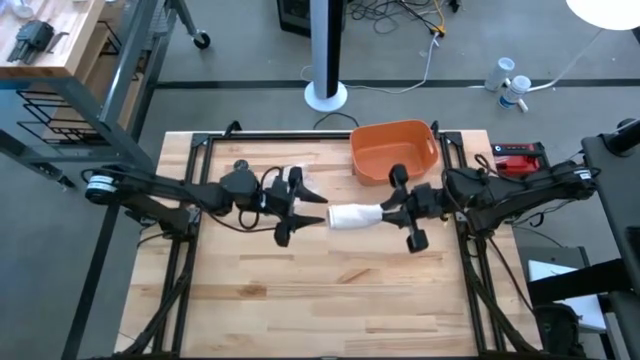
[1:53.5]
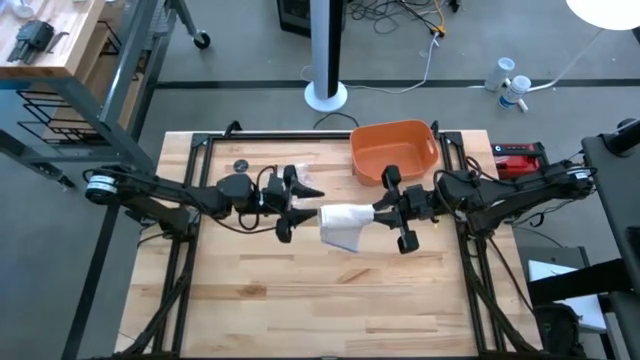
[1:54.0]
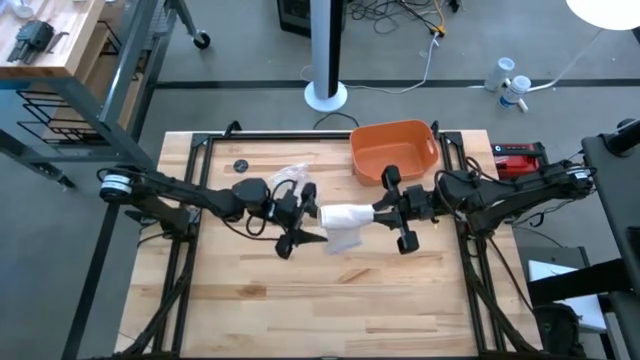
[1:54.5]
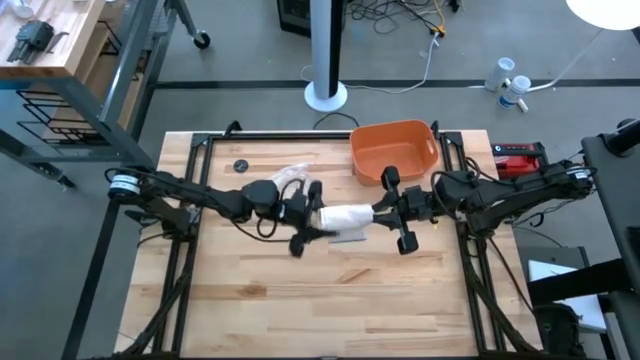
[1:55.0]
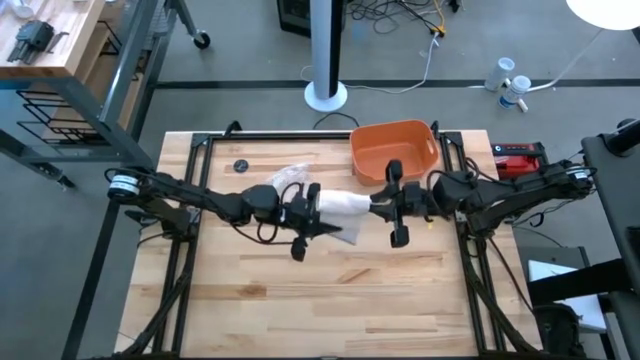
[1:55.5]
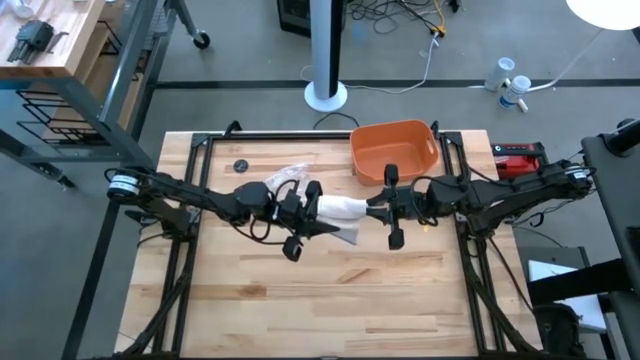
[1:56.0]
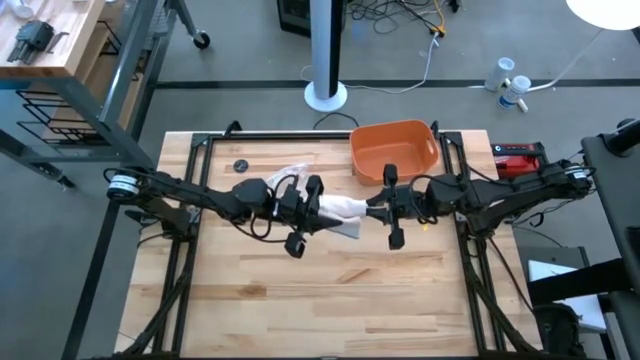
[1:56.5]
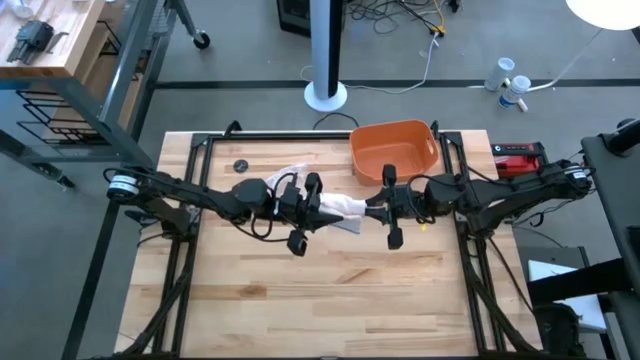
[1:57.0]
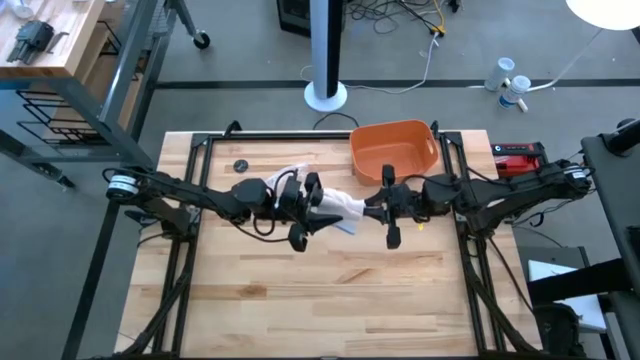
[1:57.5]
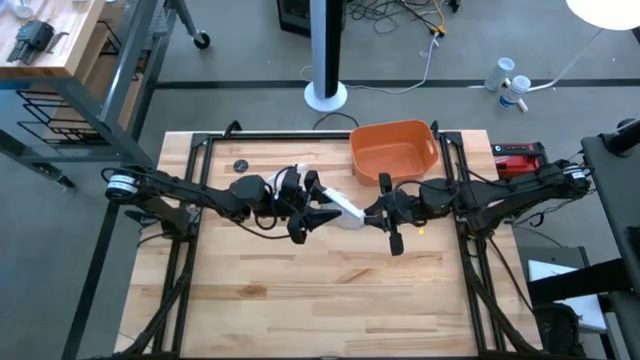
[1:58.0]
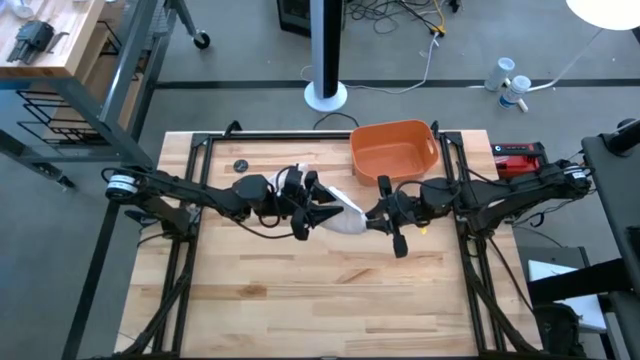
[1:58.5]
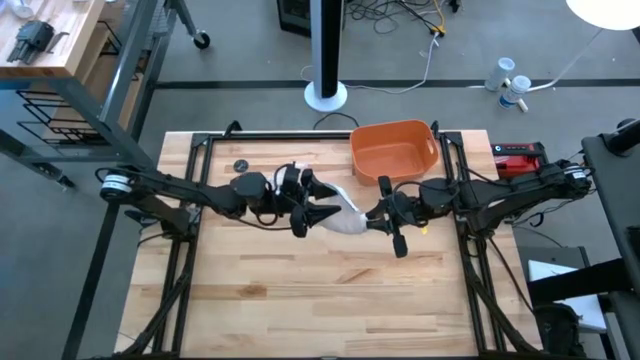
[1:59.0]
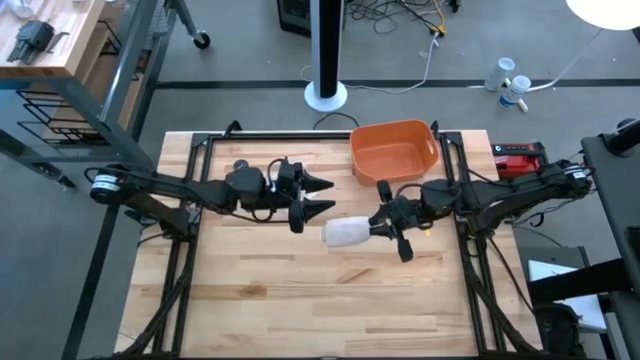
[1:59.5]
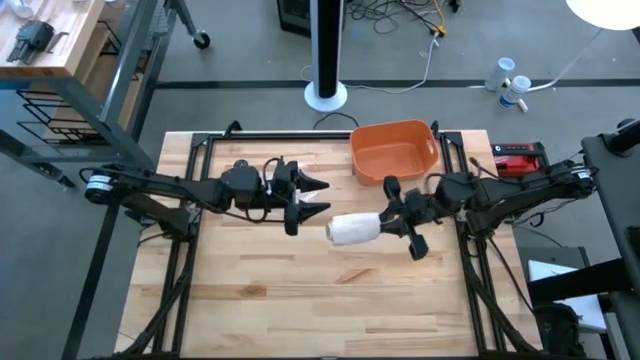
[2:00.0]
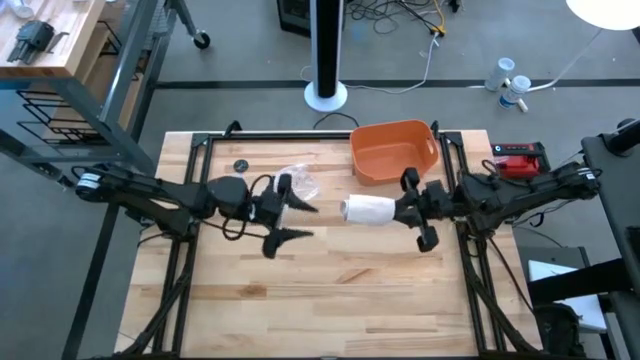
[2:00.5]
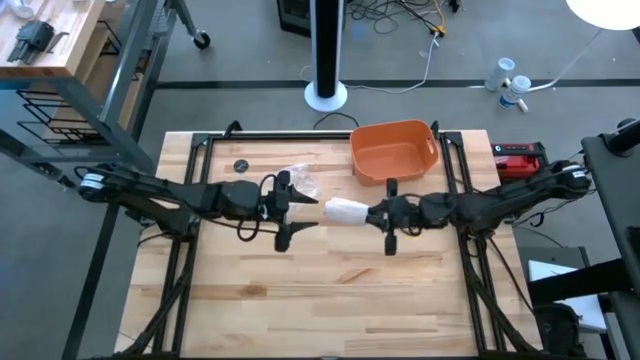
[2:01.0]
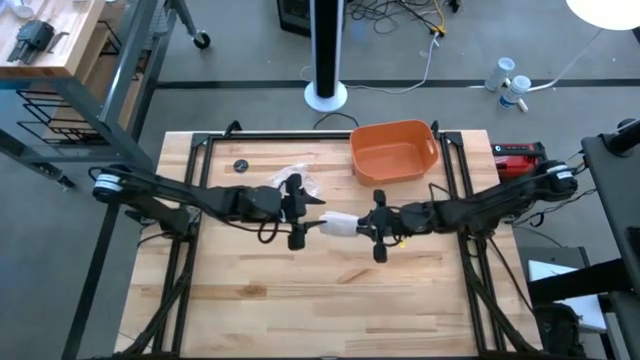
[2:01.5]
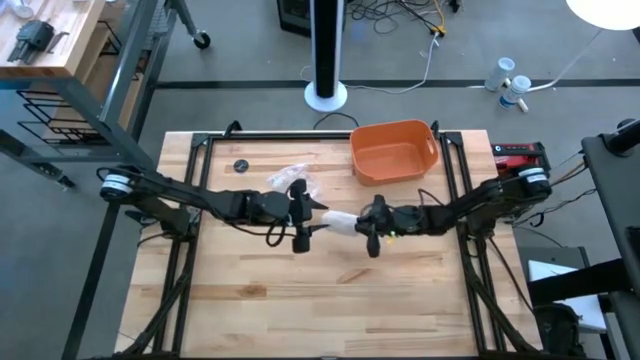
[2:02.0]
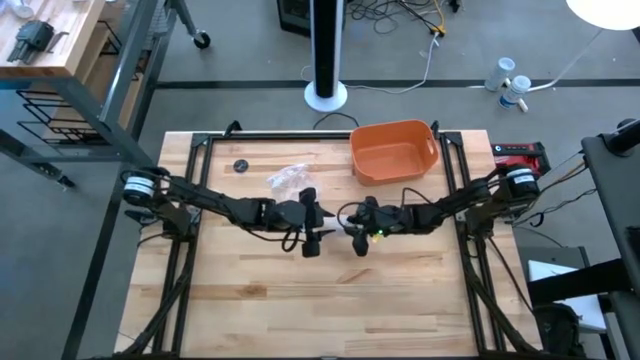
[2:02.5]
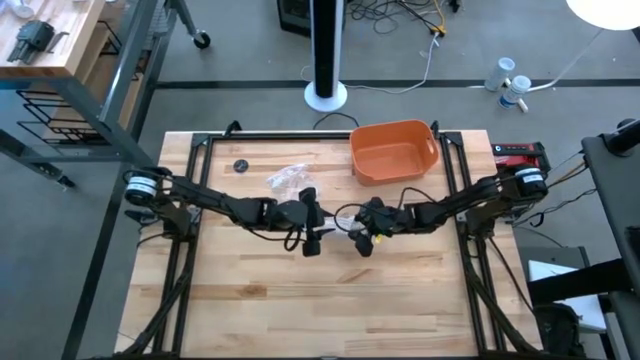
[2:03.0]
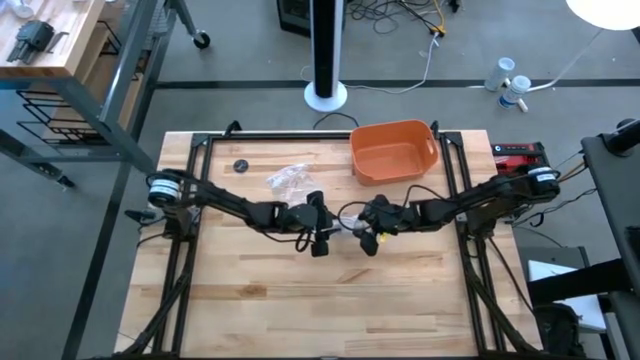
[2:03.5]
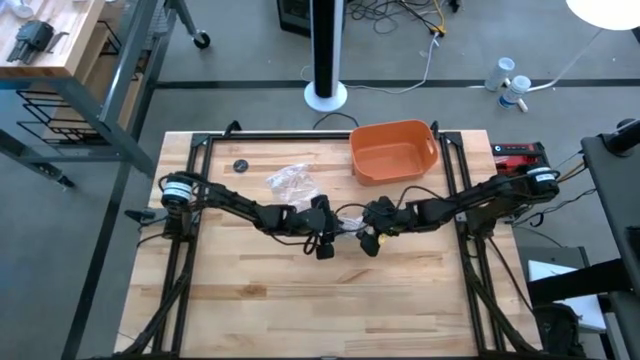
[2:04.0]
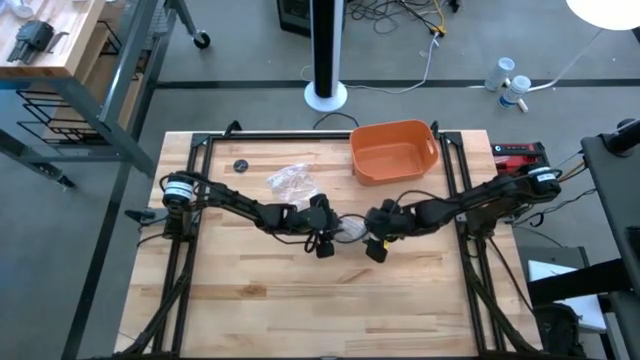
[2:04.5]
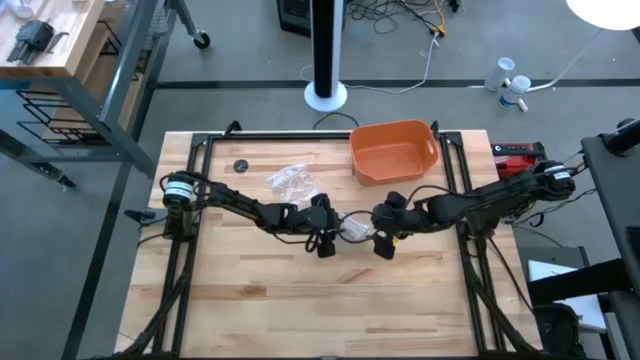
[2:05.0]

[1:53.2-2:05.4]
Task: Roll bandage
Roll the brown bandage

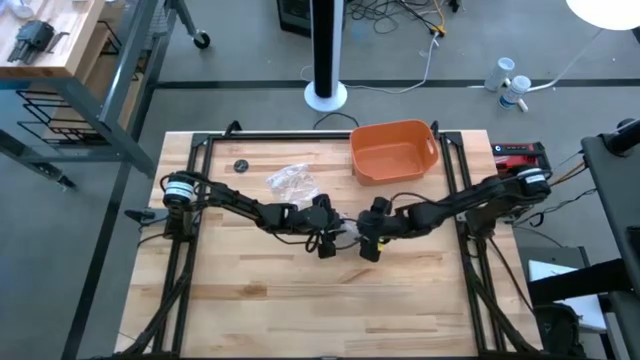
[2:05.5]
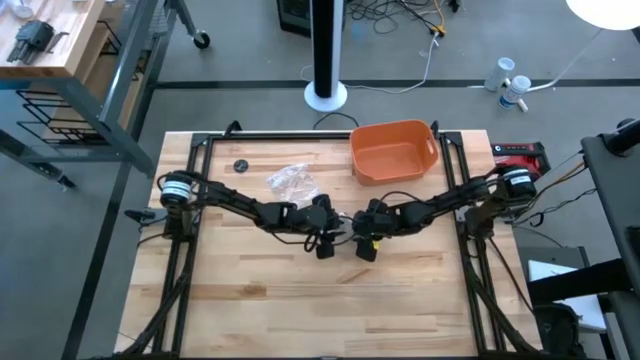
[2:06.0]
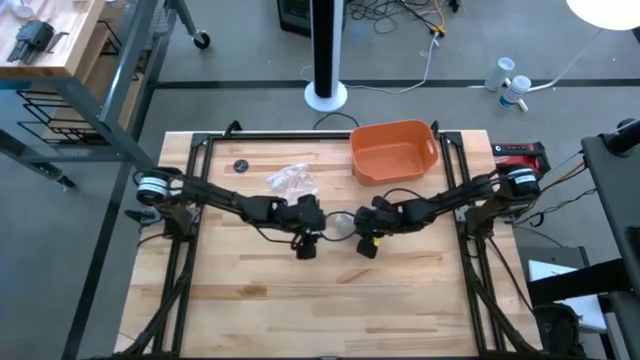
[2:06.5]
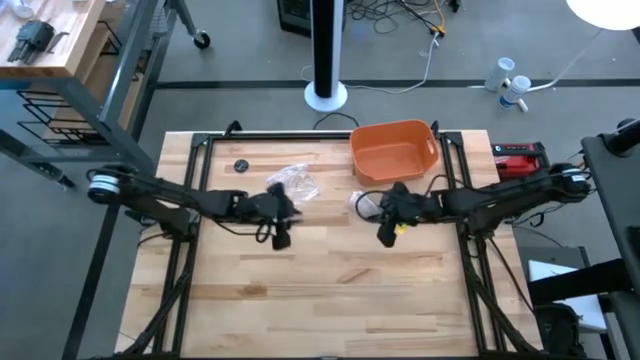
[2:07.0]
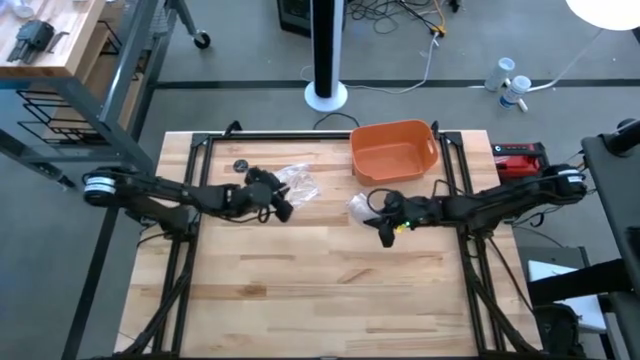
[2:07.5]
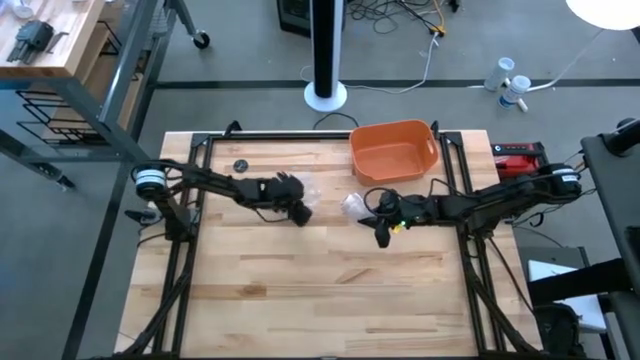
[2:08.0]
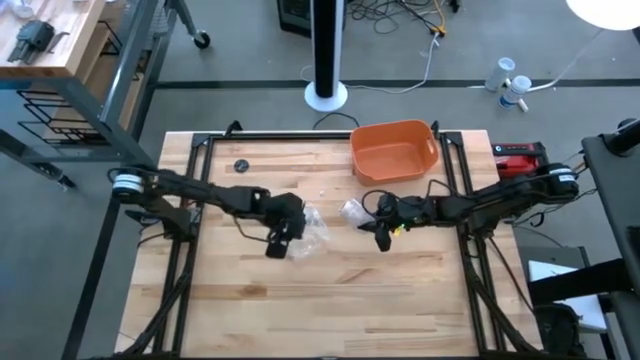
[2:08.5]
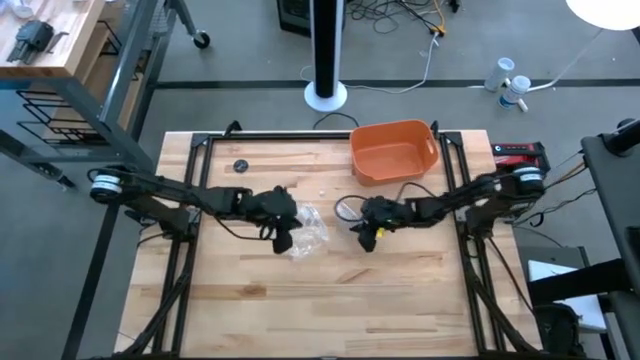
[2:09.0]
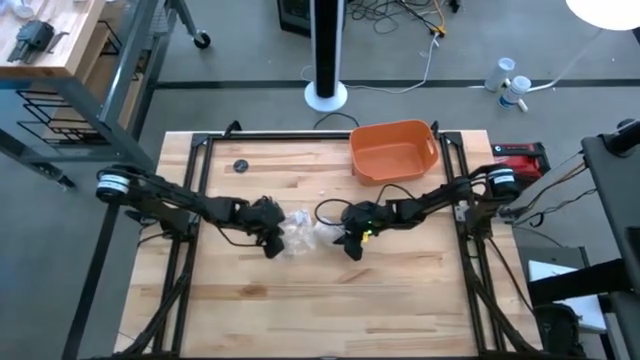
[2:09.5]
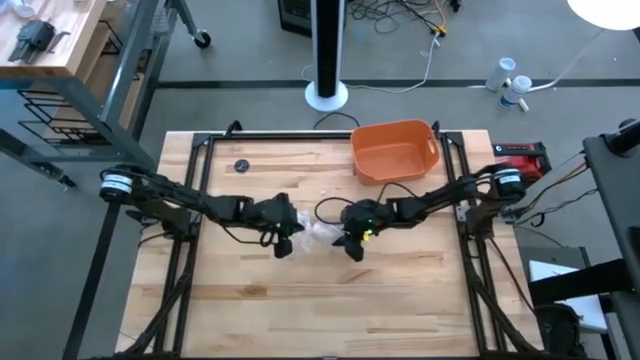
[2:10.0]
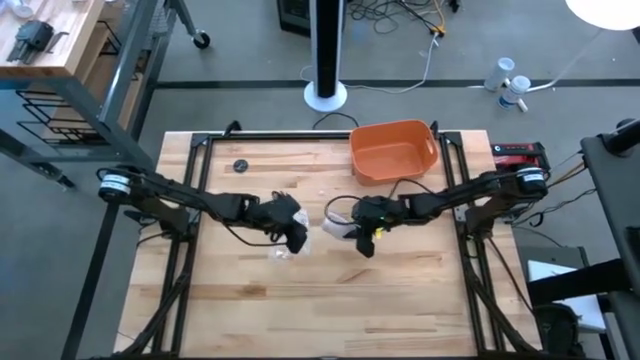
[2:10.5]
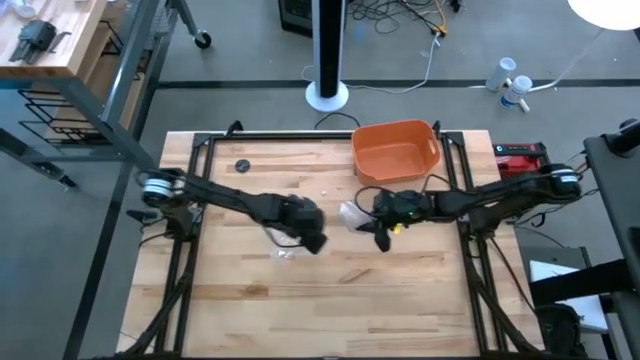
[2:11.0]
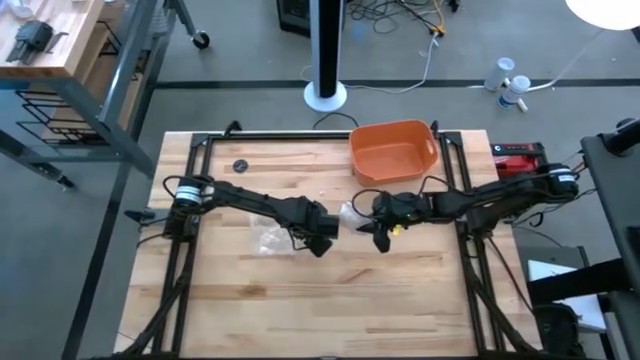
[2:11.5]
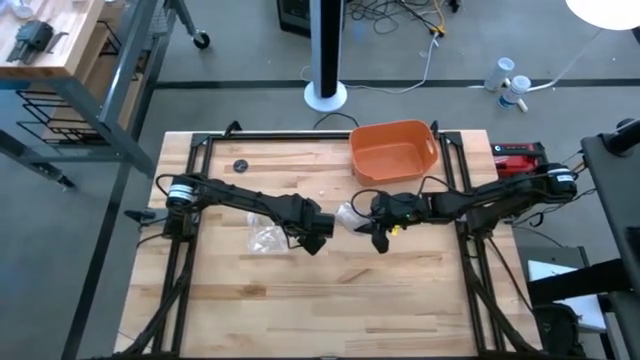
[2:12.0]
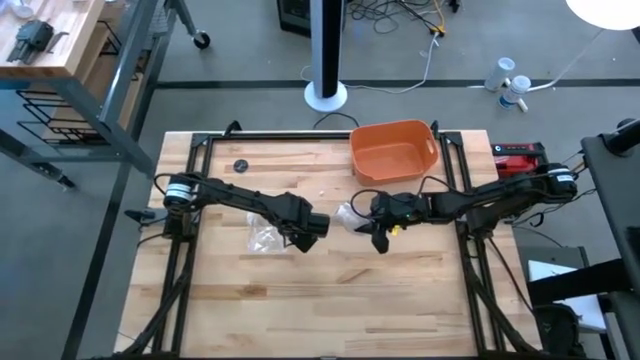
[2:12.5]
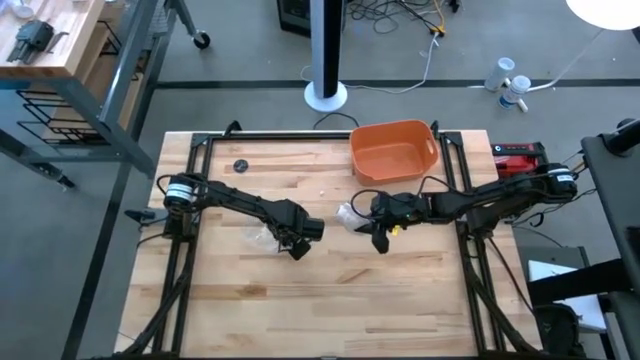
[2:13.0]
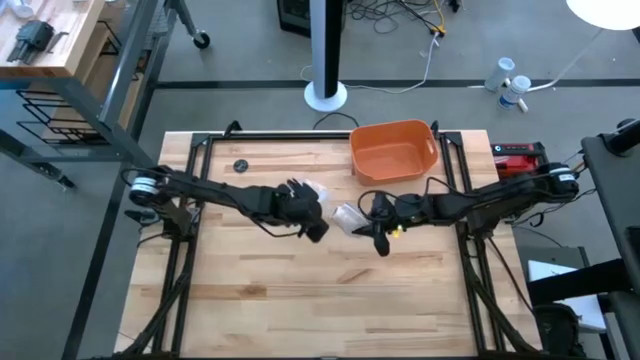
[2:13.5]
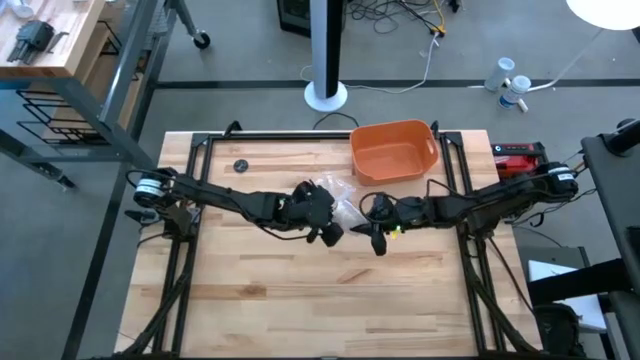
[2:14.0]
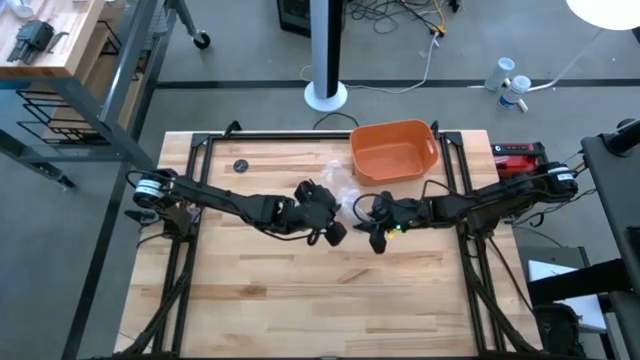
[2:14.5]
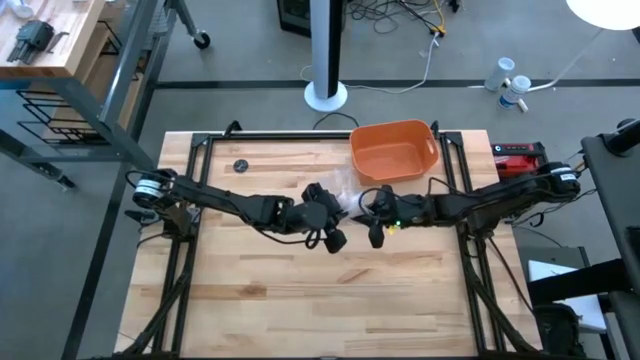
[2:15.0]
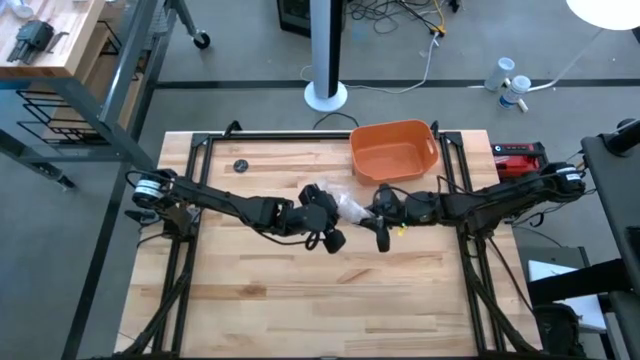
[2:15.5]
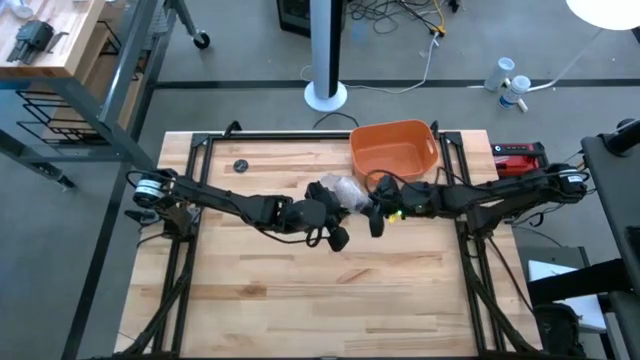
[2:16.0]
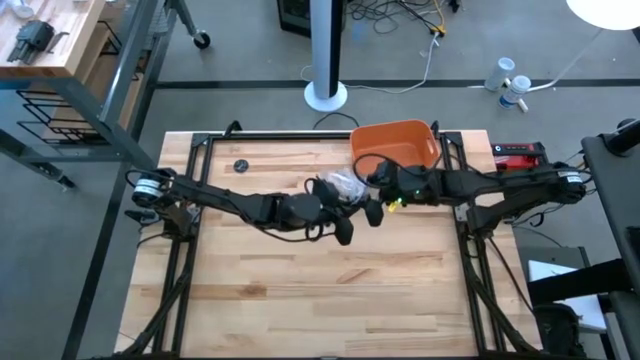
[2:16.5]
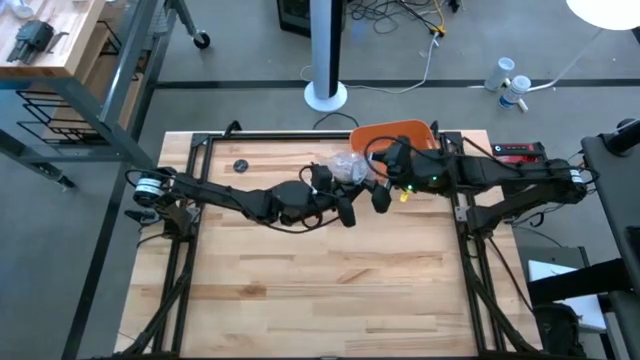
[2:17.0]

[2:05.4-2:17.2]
Put the rolled brown bandage into the transparent zip bag
